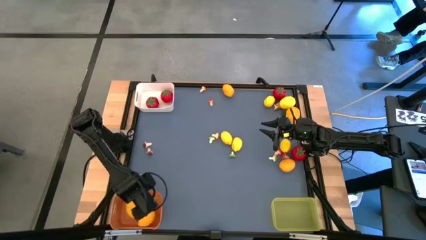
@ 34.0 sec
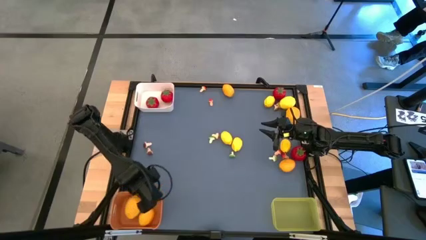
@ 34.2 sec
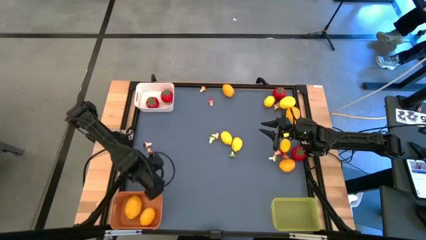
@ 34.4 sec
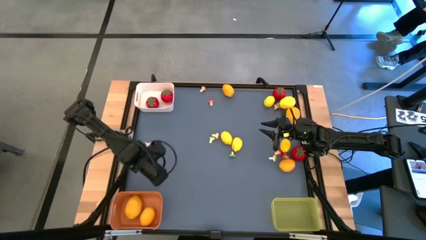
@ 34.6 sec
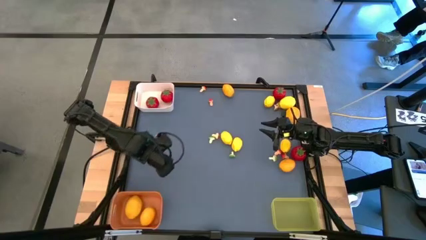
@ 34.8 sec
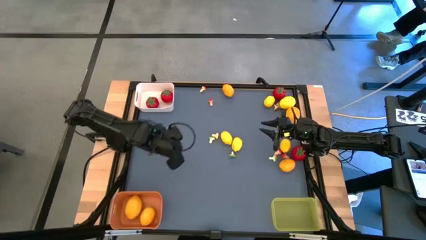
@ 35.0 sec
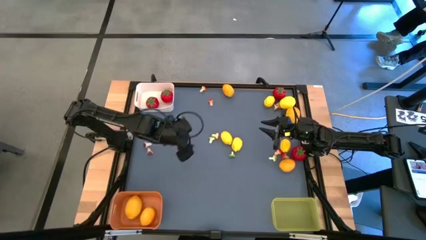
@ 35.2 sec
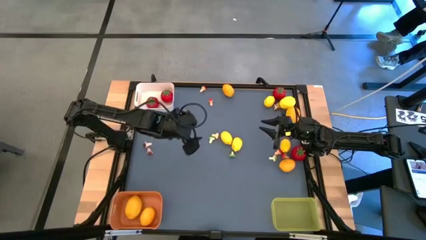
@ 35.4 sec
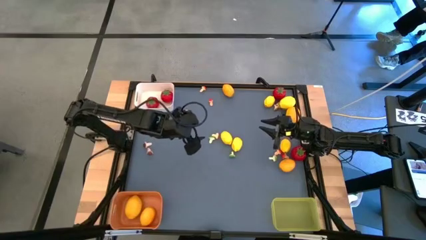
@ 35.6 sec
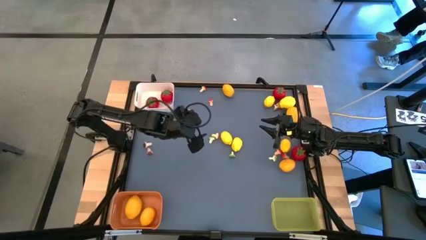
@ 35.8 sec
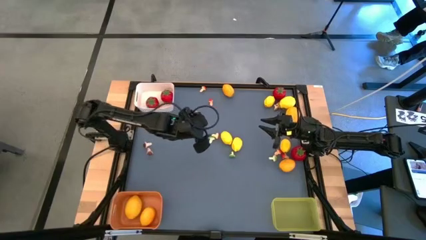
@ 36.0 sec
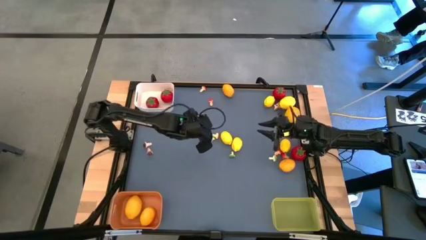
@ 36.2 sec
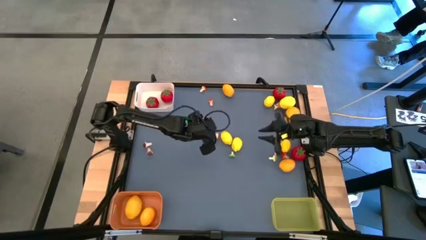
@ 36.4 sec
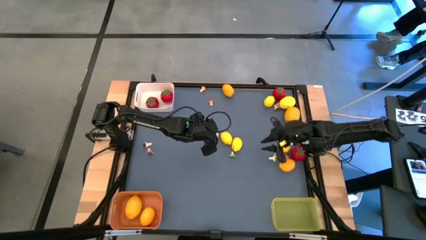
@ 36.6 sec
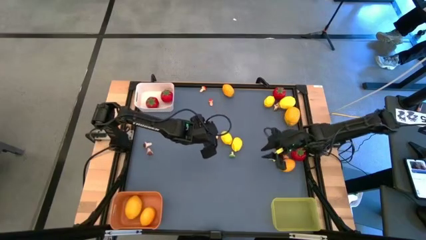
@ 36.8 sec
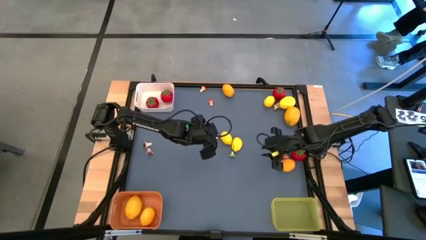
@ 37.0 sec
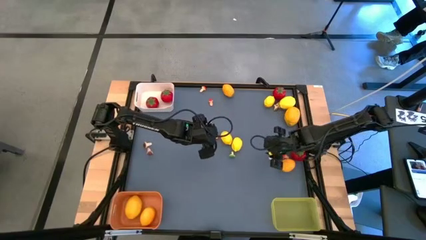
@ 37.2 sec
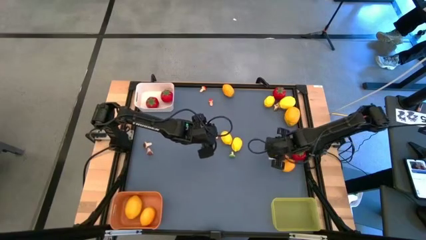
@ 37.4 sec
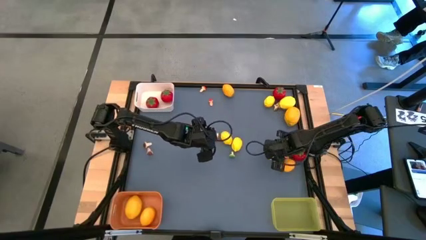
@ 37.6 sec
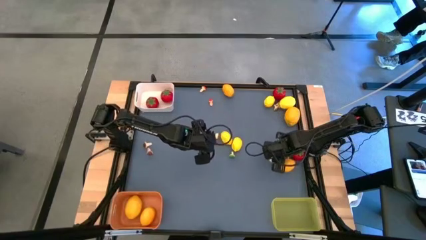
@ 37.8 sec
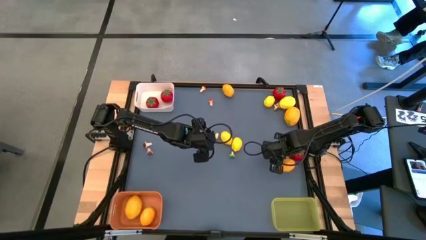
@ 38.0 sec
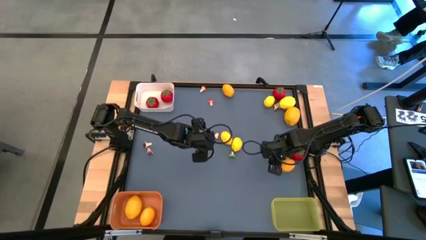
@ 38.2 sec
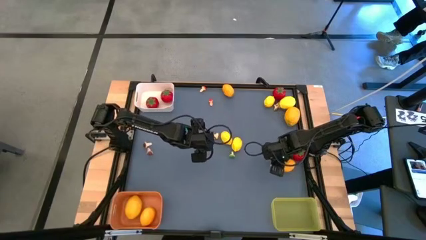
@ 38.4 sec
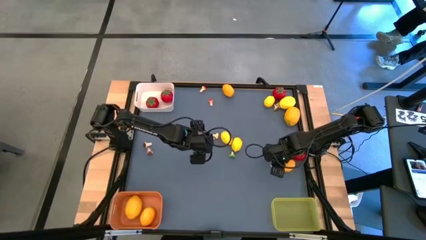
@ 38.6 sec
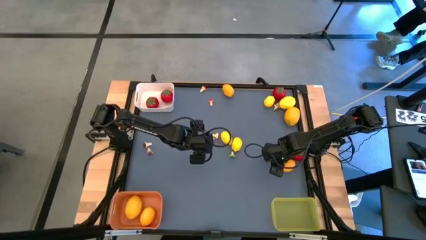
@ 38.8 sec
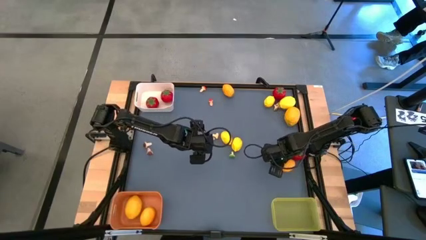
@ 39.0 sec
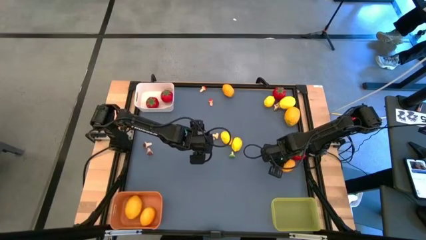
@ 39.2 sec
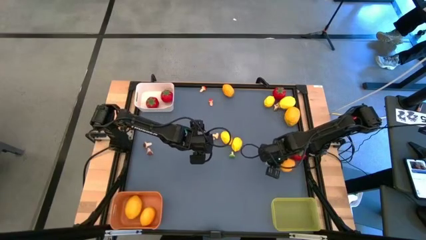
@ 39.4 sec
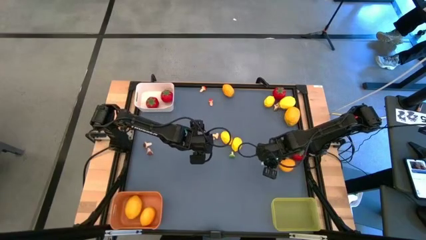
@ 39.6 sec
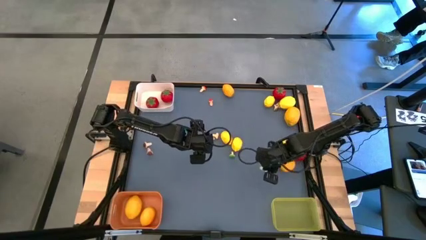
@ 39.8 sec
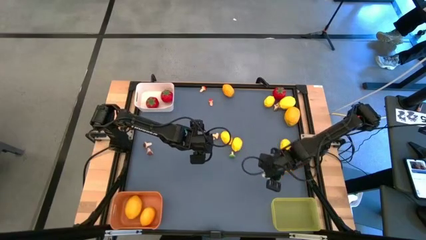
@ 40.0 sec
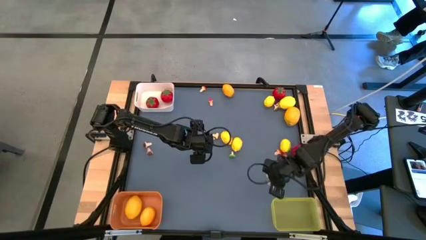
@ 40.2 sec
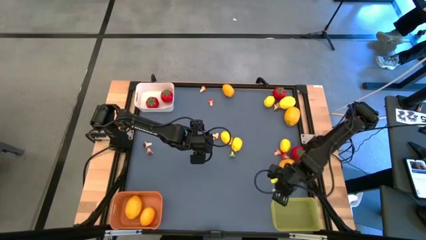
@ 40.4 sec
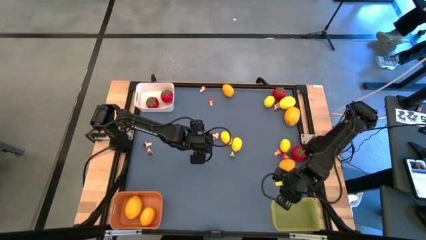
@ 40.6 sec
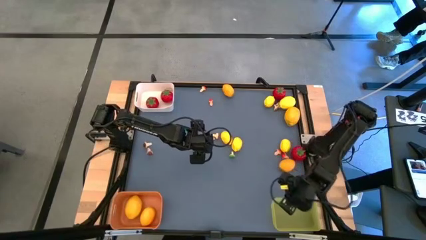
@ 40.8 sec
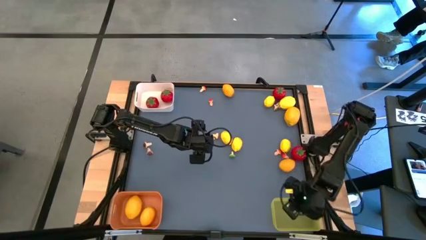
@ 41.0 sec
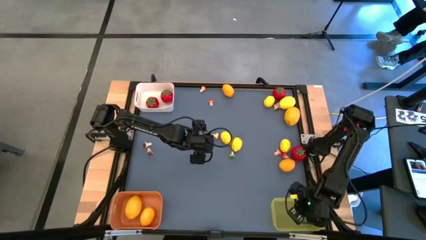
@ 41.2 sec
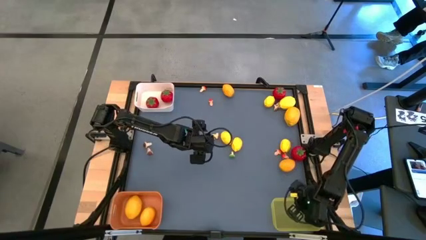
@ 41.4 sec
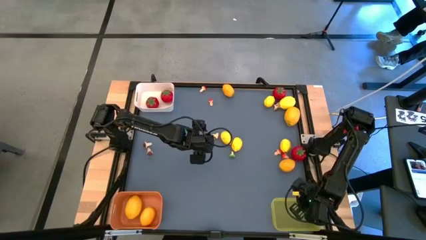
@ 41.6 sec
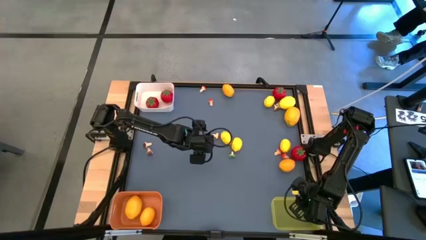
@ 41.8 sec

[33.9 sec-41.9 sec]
Task: Sort produce into baskets
Put the green mushroom into the yellow bin

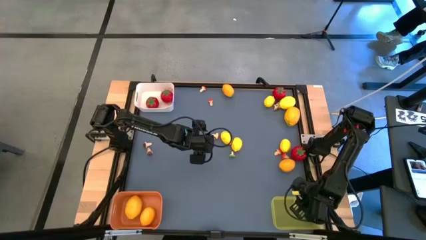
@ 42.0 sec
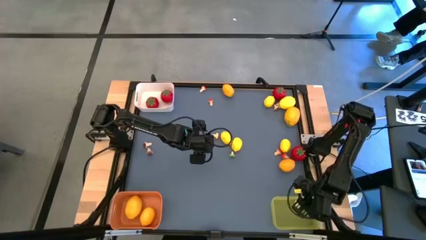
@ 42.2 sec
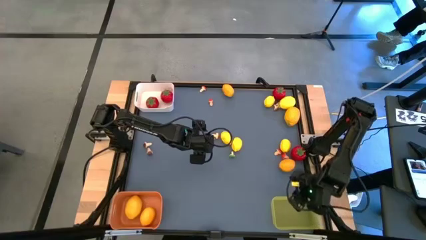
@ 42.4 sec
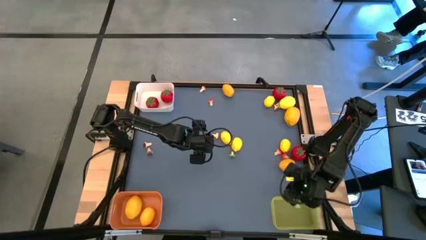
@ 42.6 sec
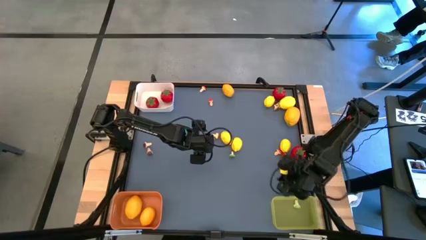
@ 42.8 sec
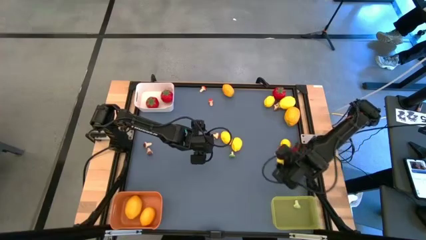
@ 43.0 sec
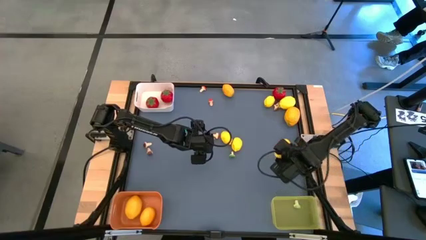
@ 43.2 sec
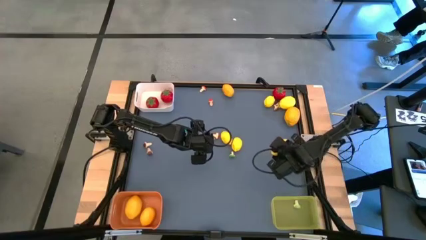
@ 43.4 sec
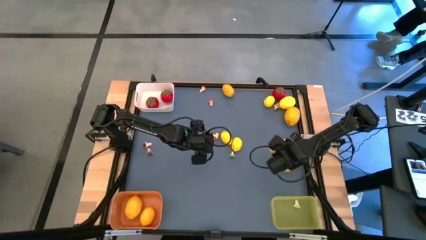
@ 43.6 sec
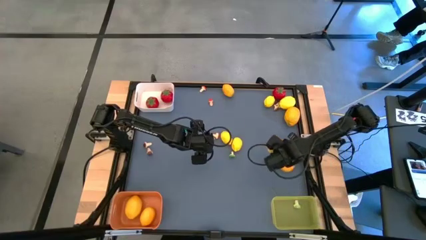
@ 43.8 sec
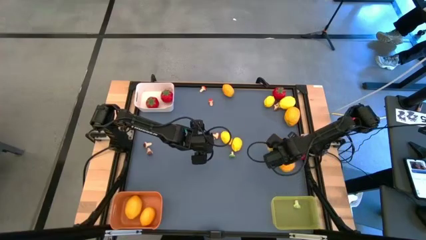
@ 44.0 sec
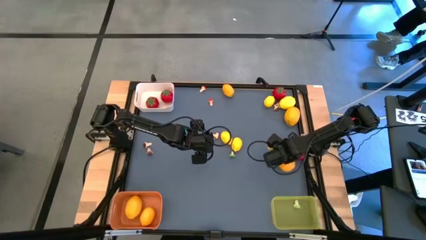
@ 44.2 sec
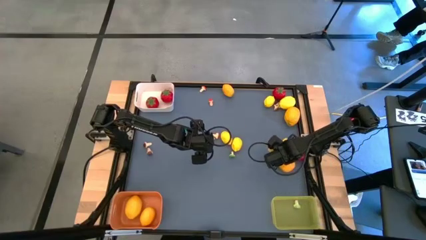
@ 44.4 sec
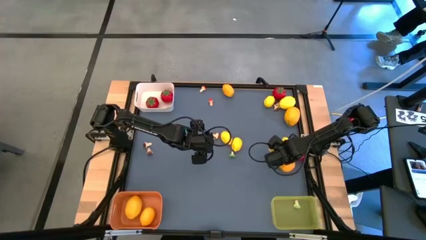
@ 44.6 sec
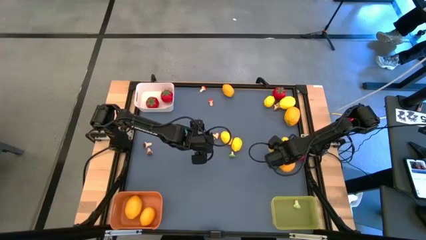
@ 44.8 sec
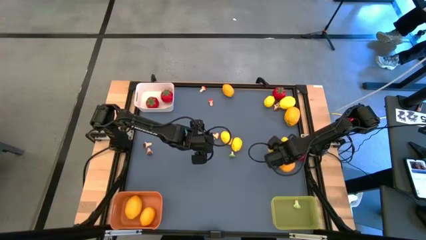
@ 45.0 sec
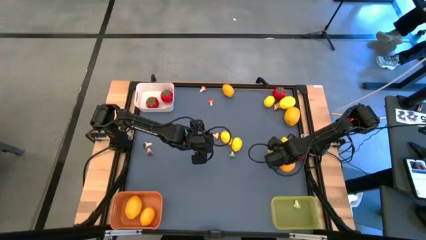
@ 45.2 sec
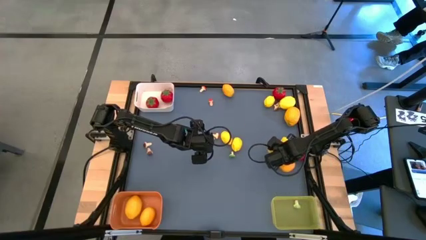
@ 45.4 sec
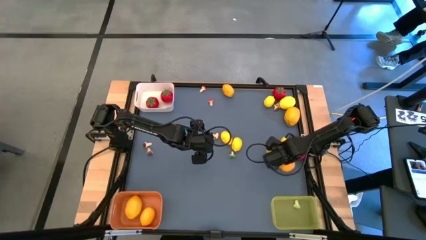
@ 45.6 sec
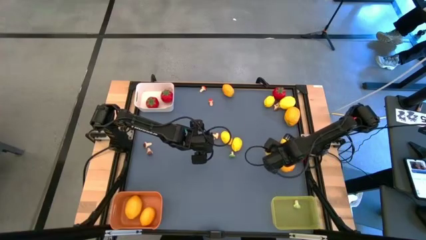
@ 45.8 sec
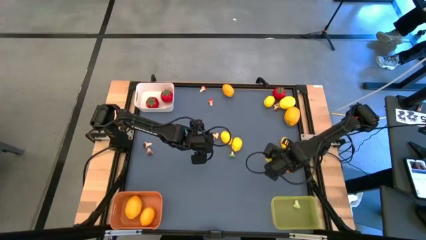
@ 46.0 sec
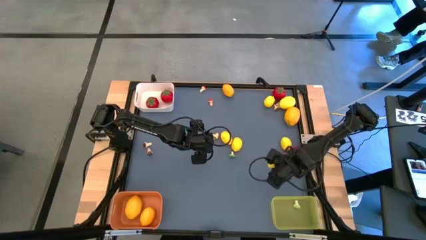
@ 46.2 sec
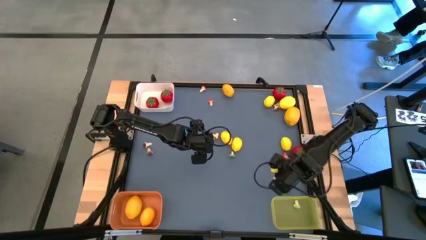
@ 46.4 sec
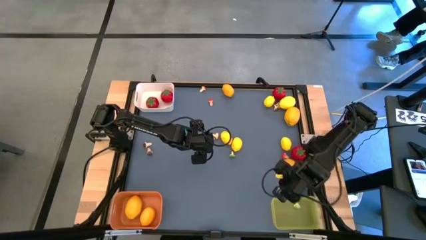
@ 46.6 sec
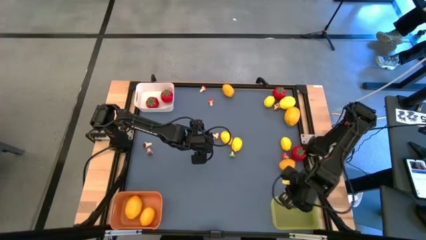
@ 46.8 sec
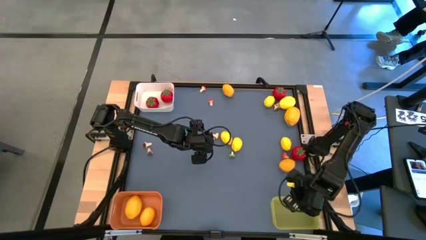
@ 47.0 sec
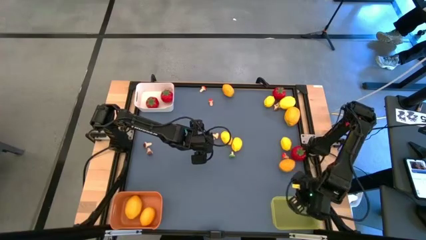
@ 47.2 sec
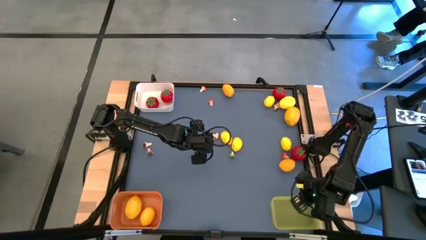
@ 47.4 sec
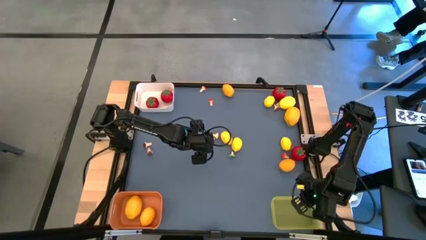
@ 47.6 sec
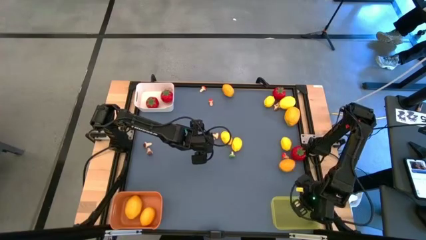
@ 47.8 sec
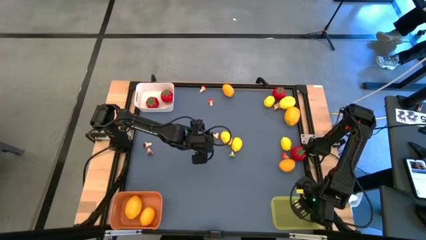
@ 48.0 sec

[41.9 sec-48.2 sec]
Put the red mushroom into the yellow bin

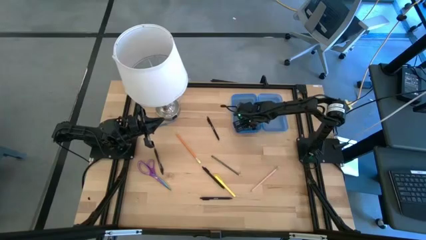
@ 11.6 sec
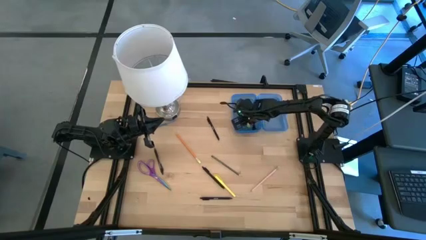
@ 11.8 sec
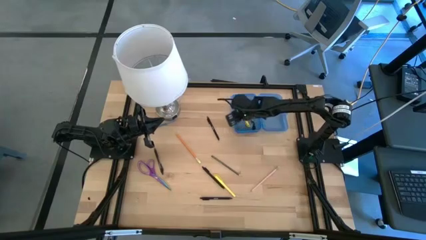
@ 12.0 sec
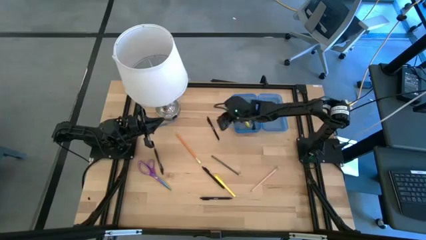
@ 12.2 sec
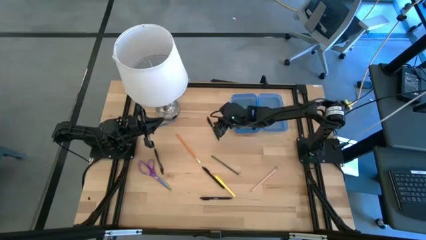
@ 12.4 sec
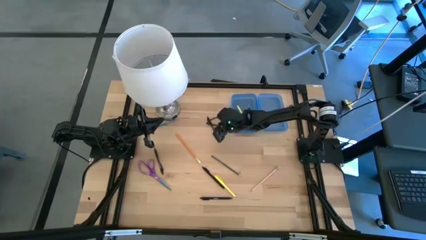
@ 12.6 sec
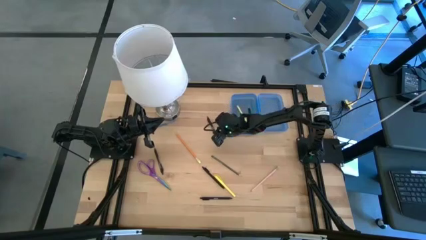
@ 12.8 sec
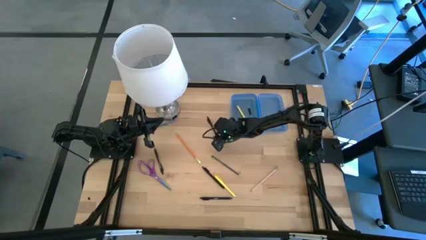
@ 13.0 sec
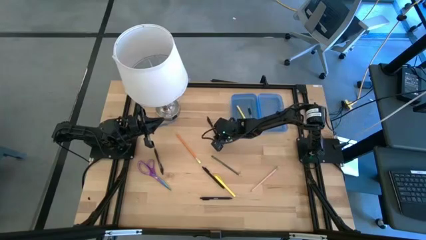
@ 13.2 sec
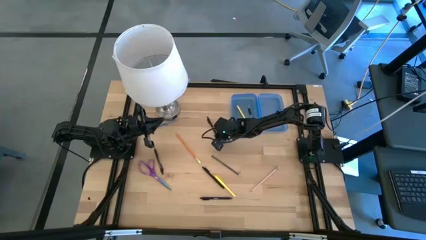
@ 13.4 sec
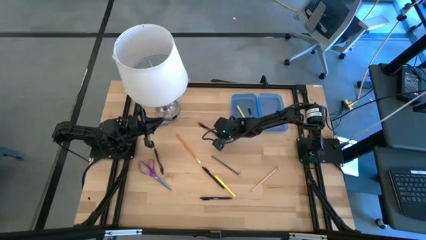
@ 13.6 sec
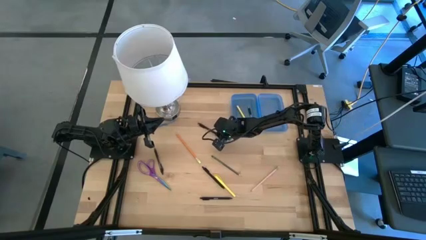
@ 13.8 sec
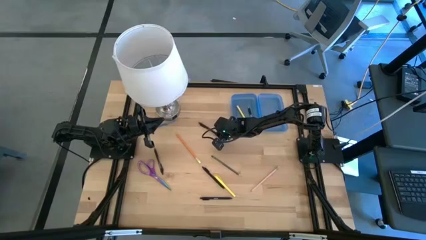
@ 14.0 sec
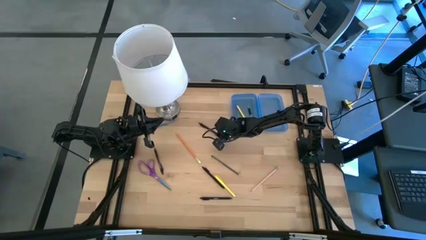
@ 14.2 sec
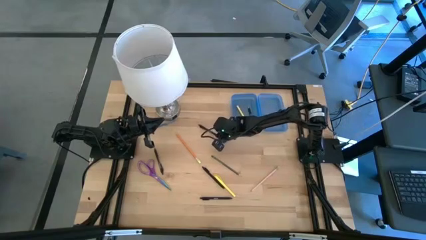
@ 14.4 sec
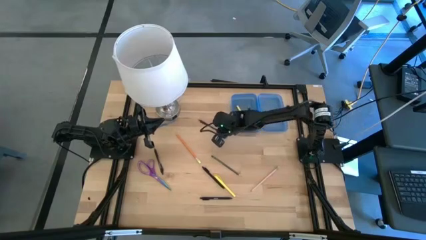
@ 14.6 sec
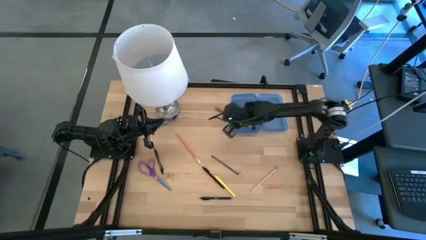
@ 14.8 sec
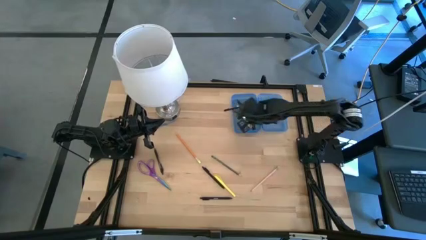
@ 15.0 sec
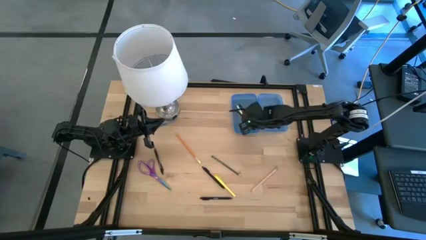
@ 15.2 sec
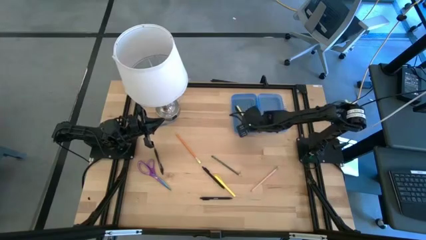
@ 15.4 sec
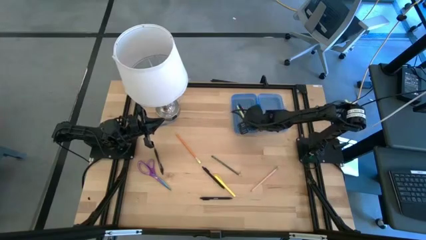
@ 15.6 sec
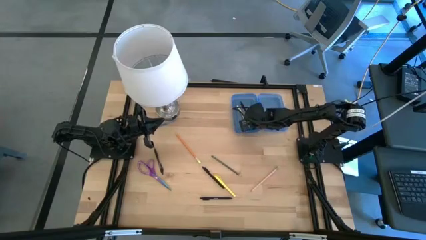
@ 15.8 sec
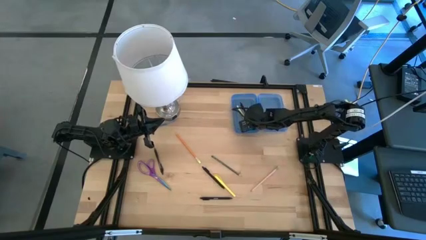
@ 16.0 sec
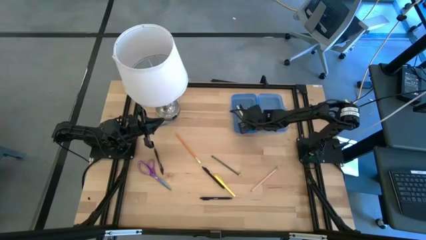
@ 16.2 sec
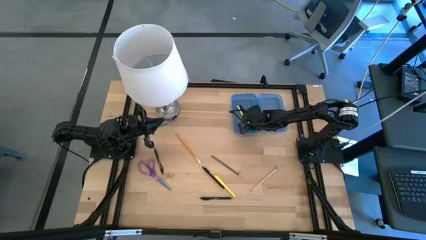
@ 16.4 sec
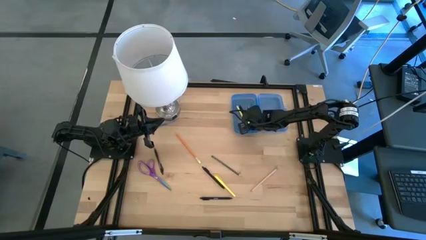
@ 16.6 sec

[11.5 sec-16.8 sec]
Task: Pick & place school supplies into a supply box
Put the top black pen into the blue supply box
